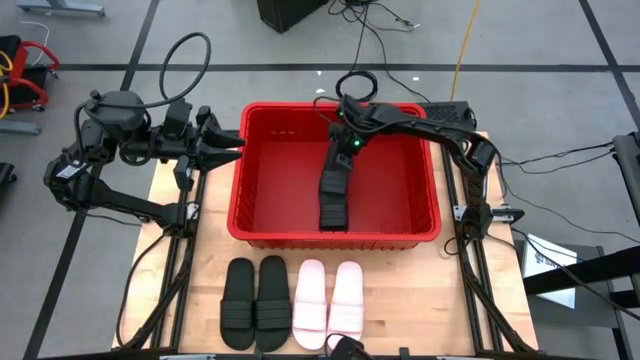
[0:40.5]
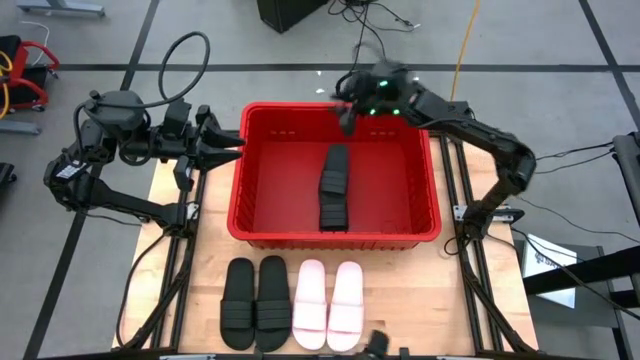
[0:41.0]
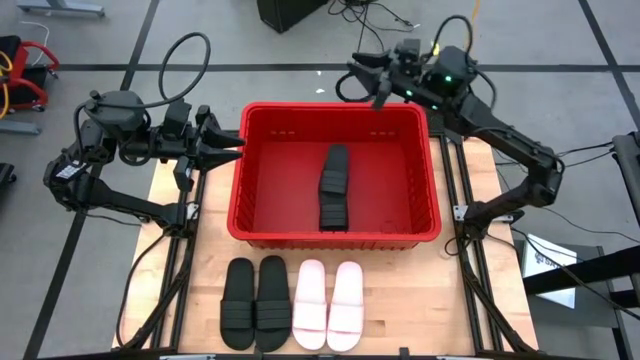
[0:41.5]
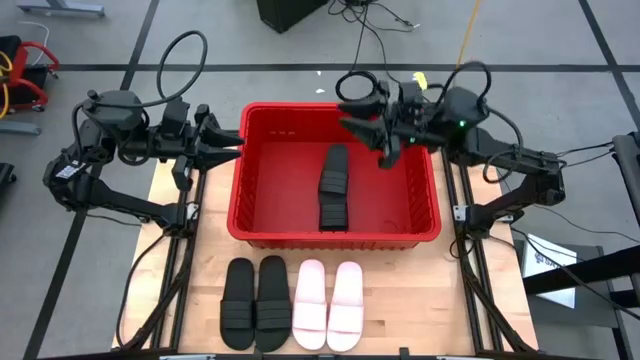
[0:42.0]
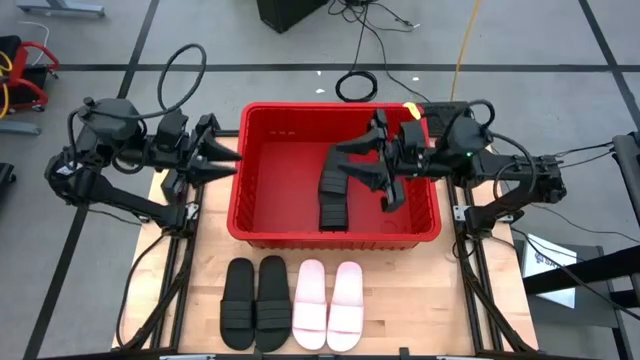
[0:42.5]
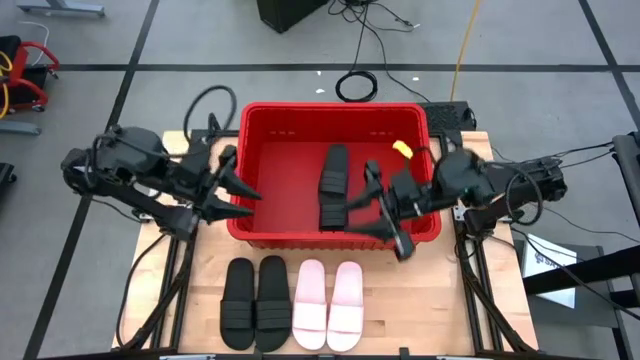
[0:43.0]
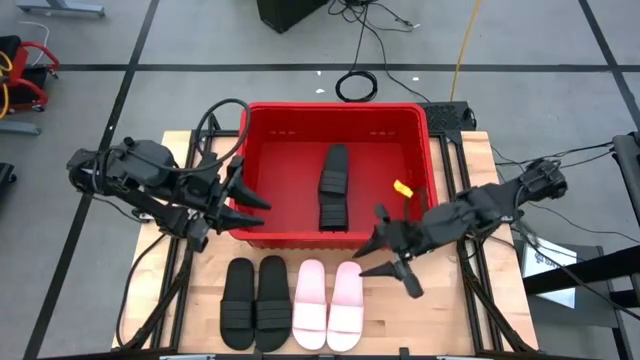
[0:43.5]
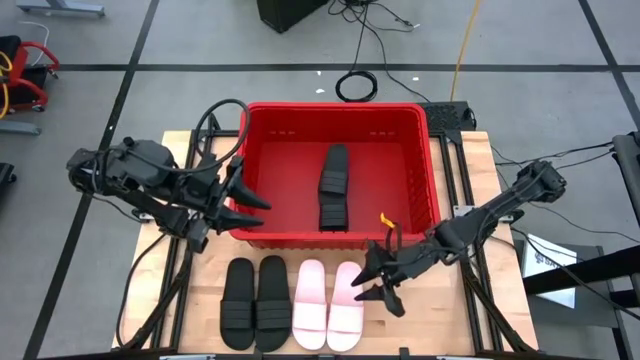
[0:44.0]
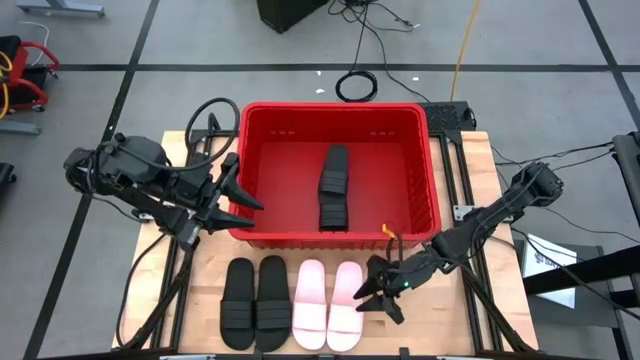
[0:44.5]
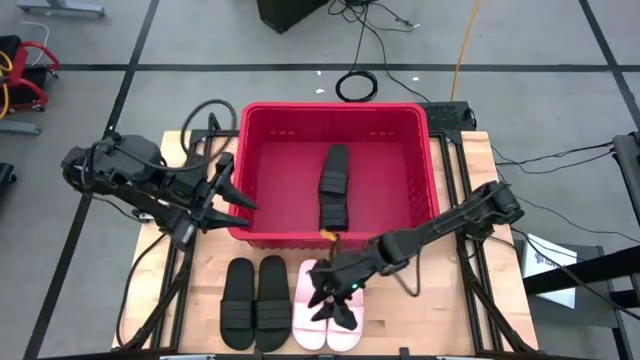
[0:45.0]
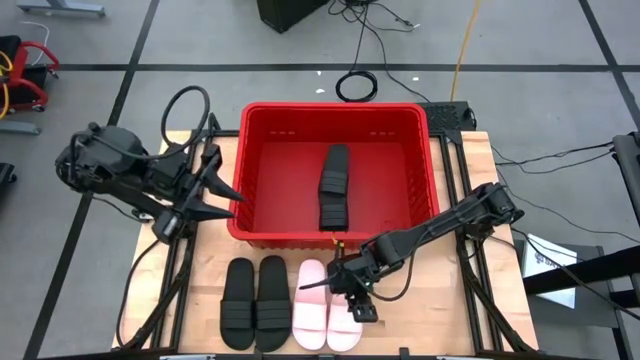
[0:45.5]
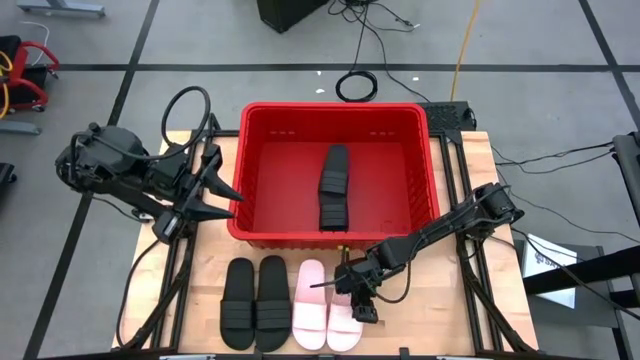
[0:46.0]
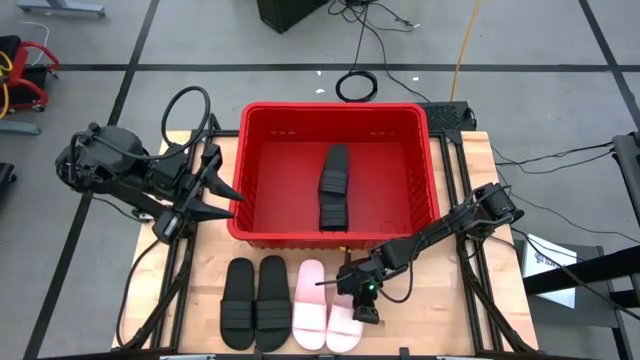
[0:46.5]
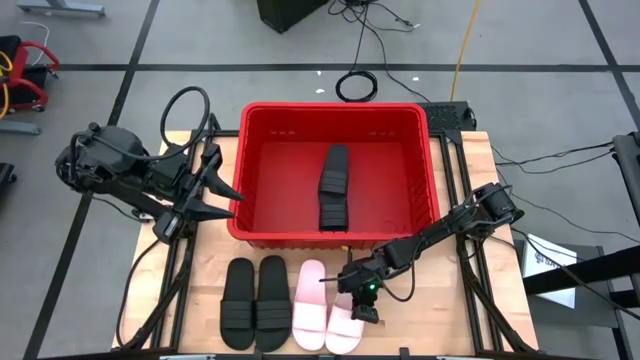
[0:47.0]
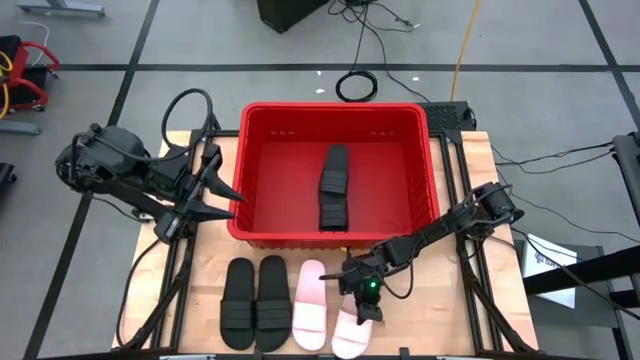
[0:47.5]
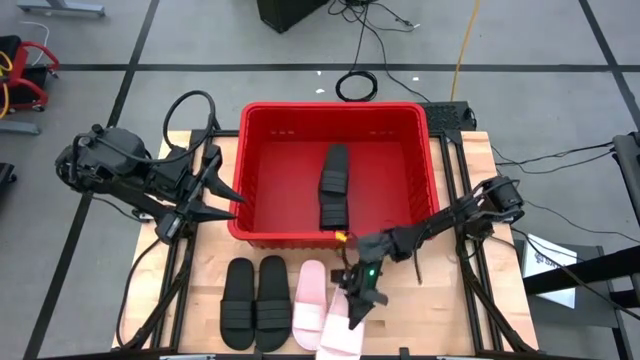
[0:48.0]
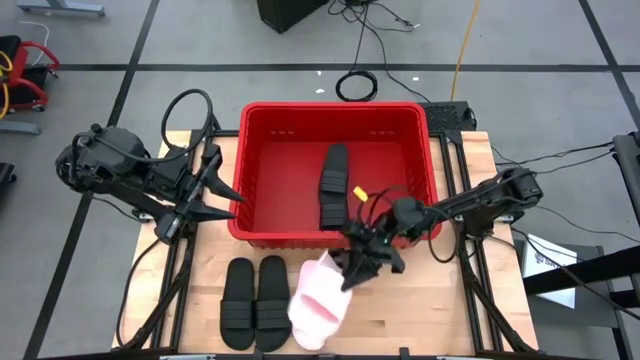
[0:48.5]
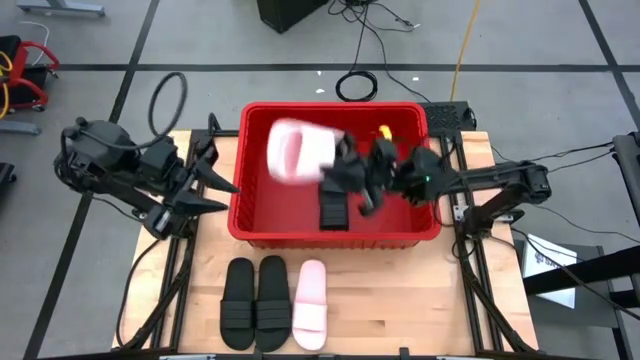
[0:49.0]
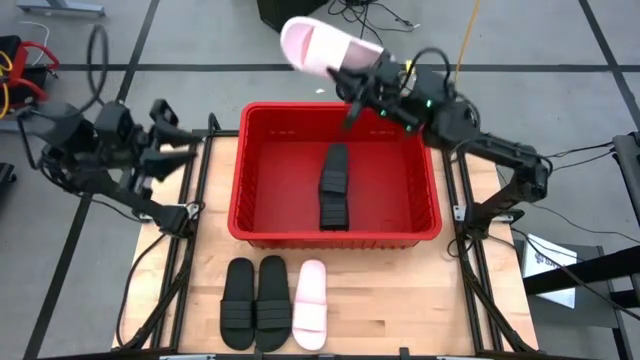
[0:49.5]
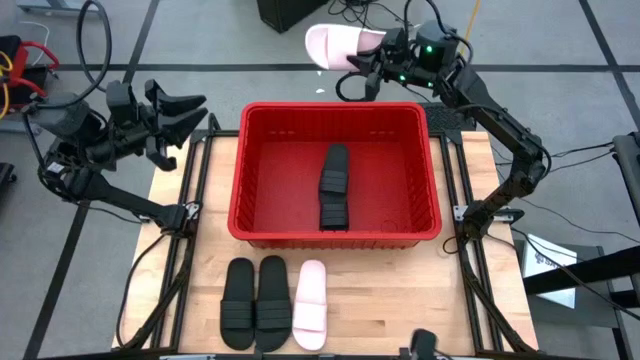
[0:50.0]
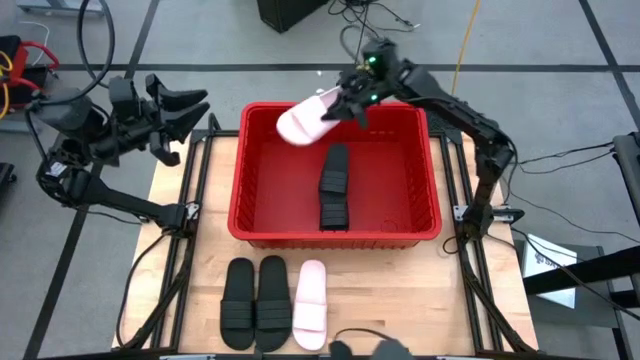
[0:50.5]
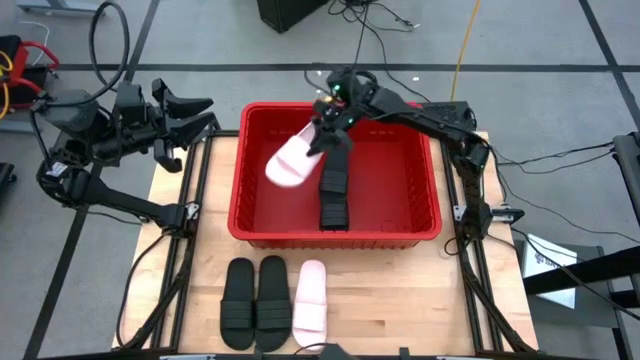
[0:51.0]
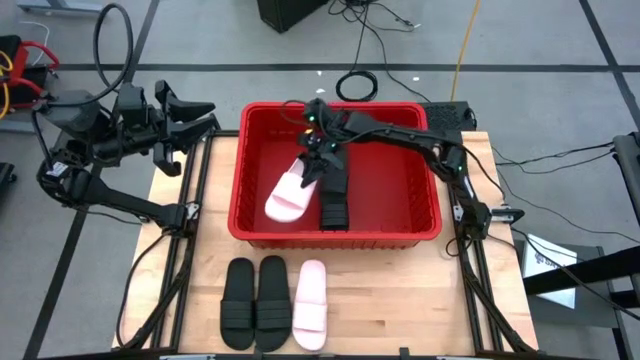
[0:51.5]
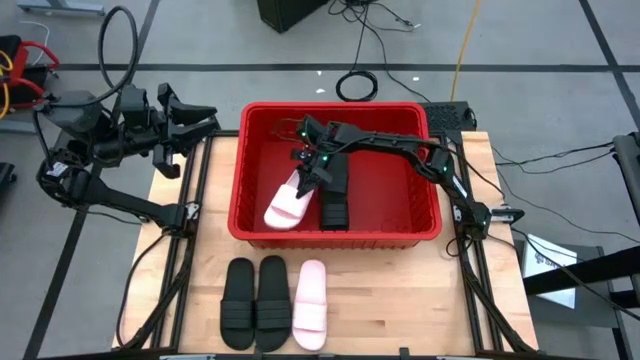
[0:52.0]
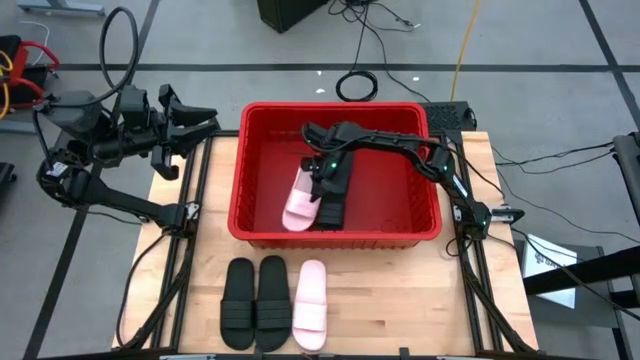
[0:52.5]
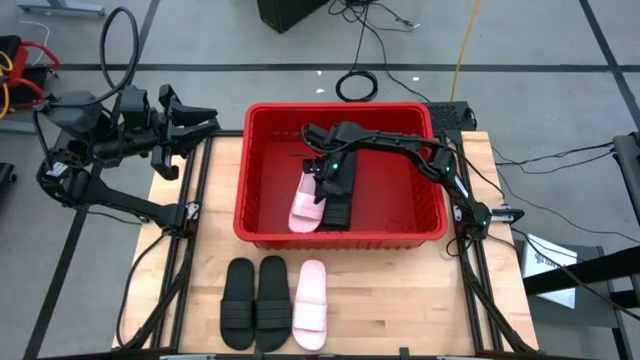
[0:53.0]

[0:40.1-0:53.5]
Task: Pick and place slides into bin
Put the right pink slipper into the red bin

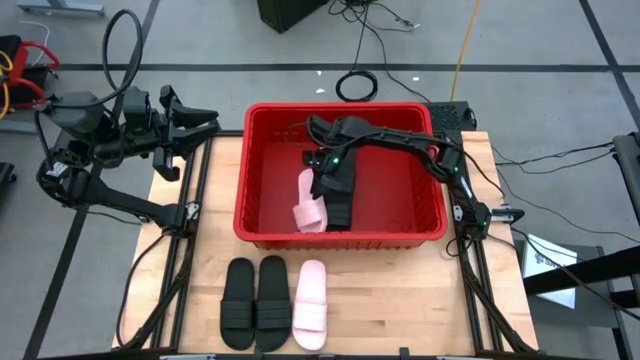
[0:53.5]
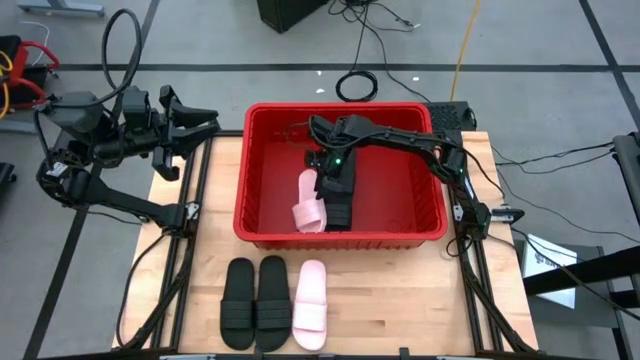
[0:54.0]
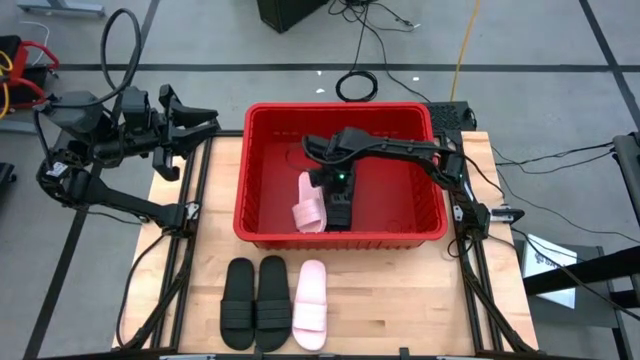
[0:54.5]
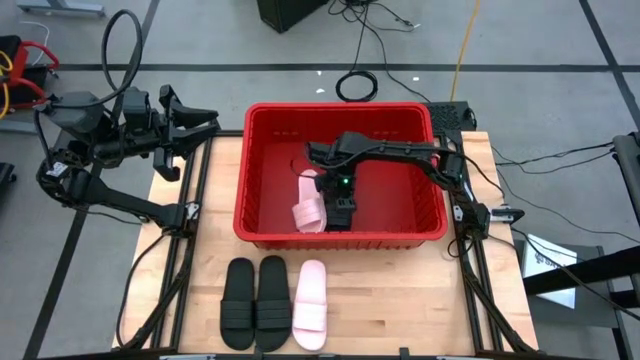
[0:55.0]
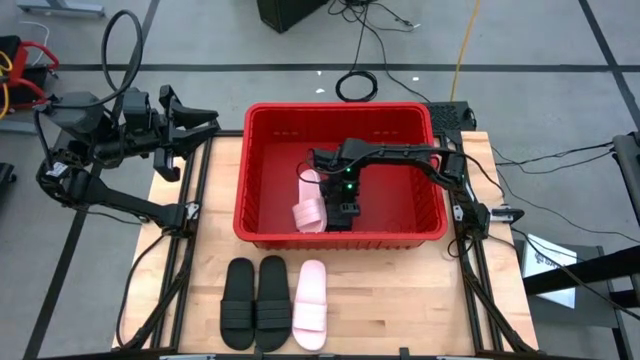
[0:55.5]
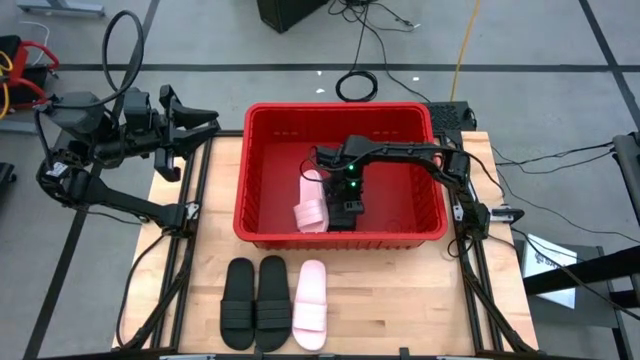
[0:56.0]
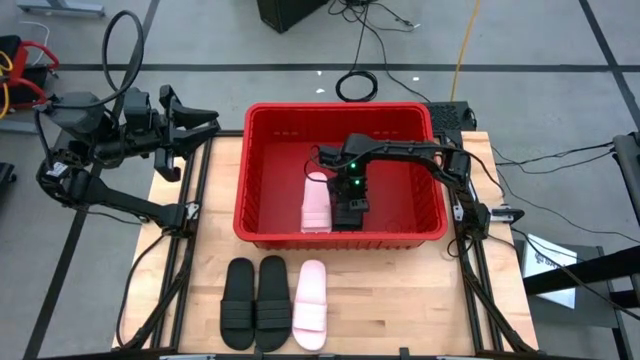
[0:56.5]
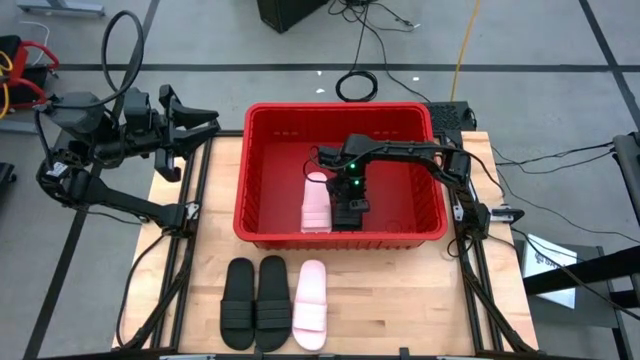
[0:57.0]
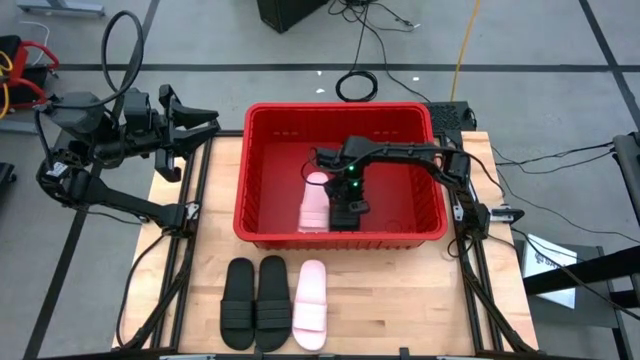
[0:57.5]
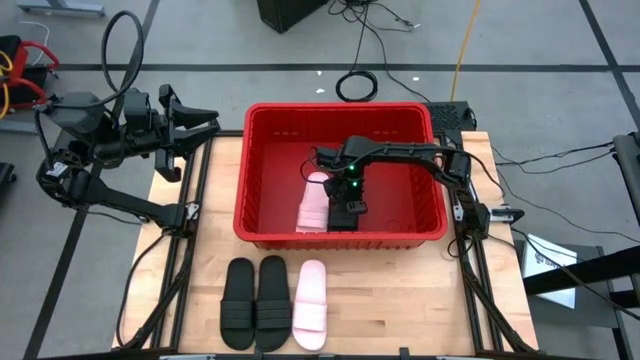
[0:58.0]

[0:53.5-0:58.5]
Adjust the black slipper in the red bin
